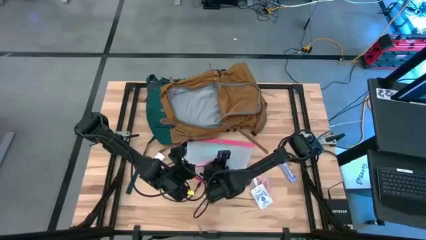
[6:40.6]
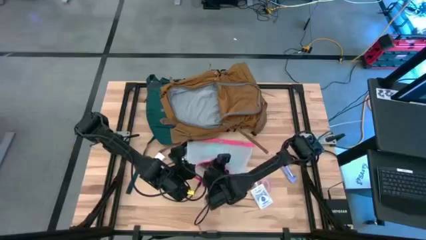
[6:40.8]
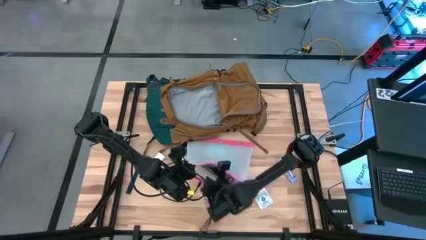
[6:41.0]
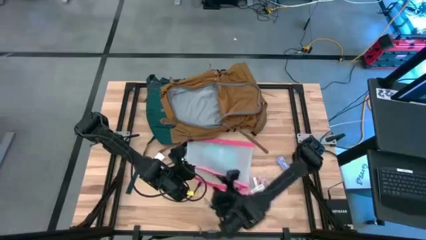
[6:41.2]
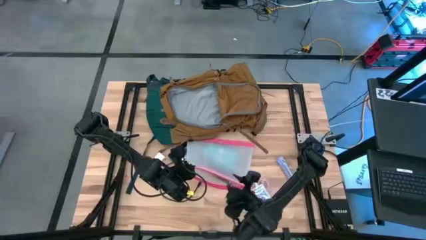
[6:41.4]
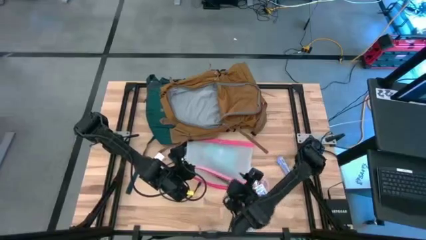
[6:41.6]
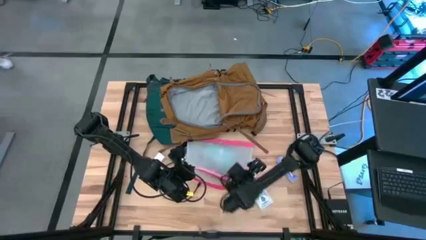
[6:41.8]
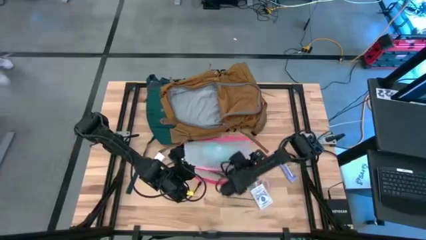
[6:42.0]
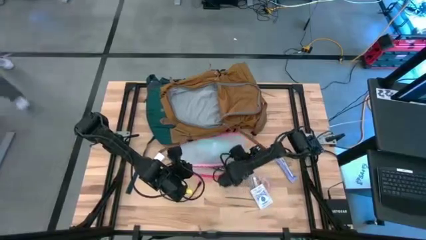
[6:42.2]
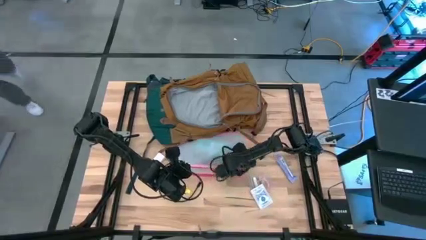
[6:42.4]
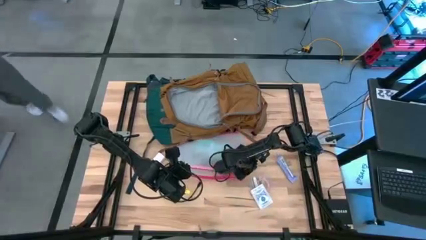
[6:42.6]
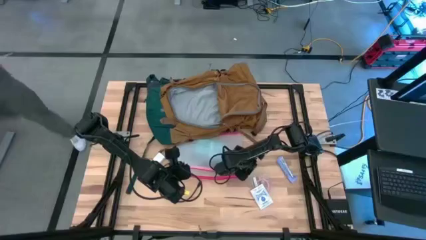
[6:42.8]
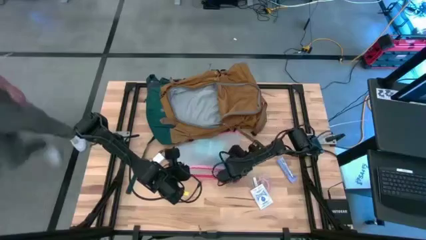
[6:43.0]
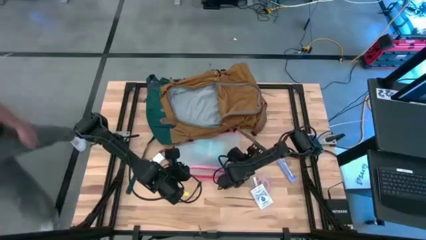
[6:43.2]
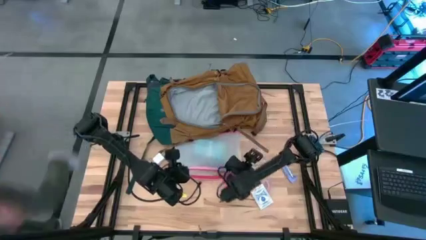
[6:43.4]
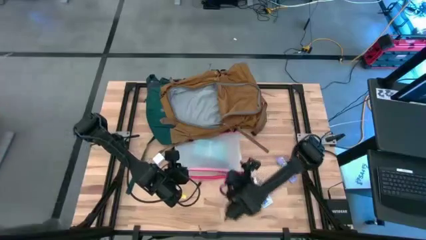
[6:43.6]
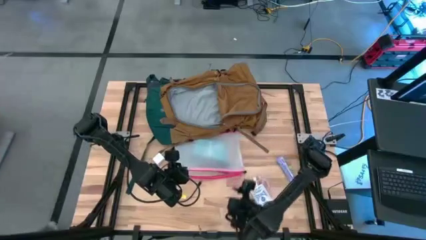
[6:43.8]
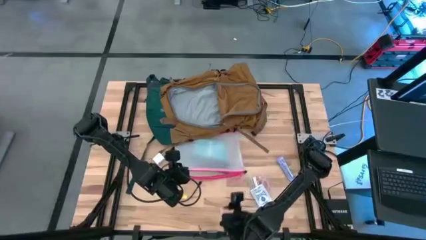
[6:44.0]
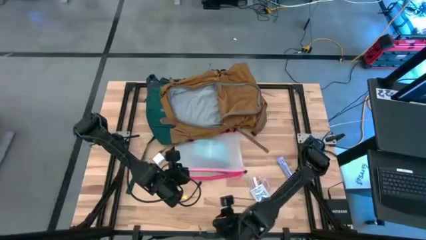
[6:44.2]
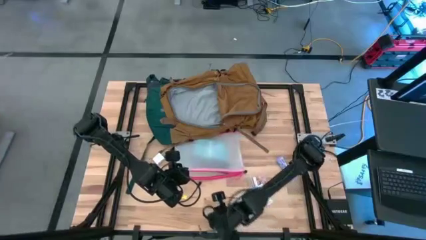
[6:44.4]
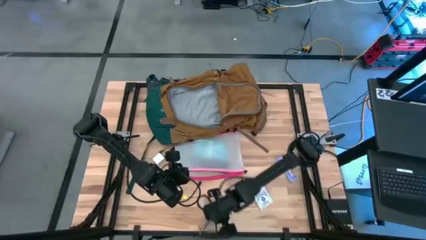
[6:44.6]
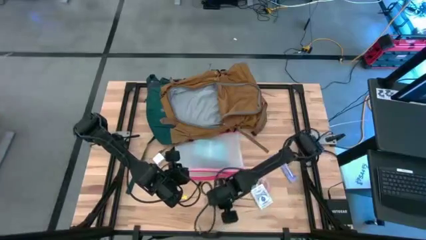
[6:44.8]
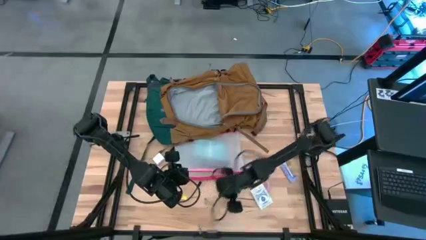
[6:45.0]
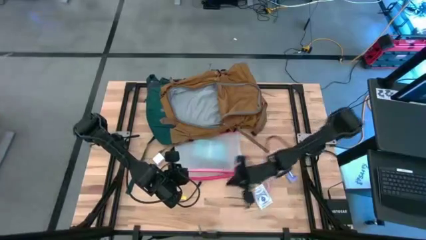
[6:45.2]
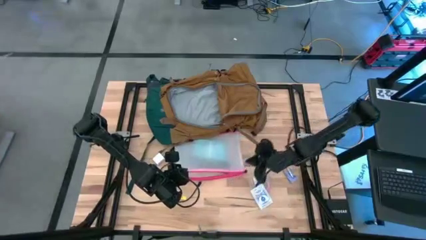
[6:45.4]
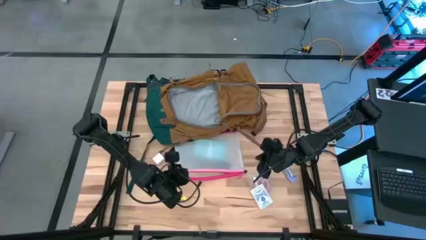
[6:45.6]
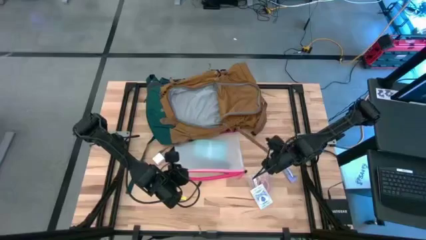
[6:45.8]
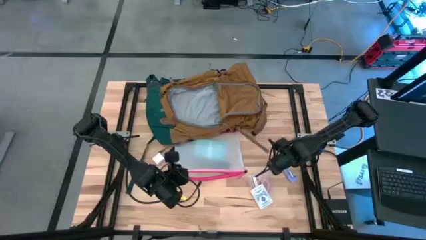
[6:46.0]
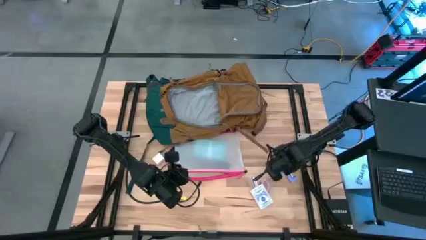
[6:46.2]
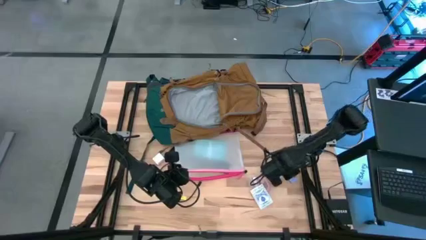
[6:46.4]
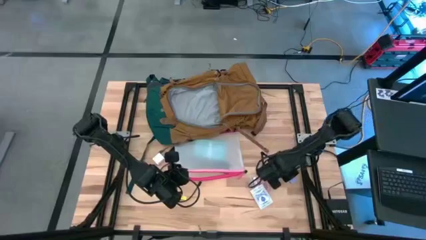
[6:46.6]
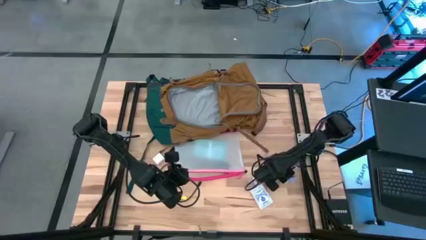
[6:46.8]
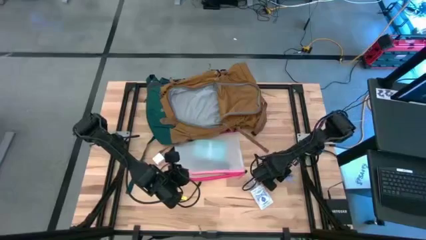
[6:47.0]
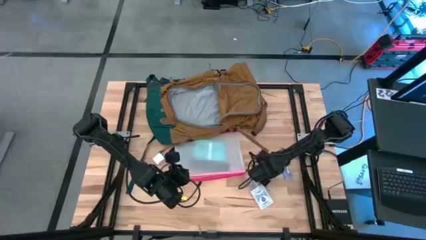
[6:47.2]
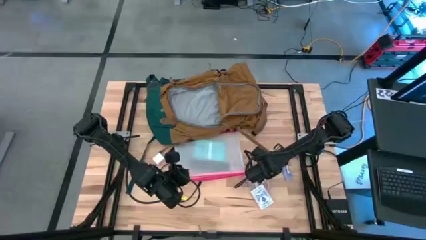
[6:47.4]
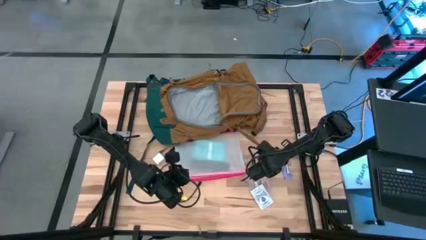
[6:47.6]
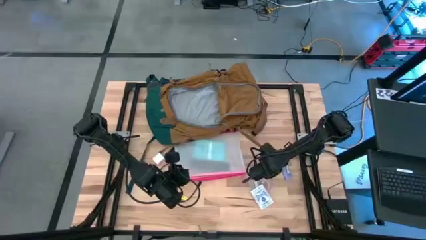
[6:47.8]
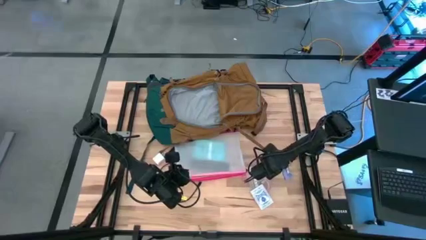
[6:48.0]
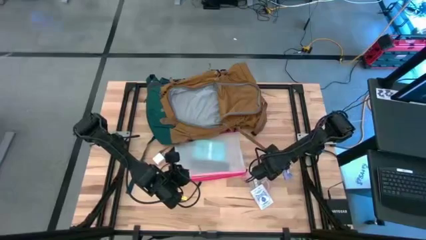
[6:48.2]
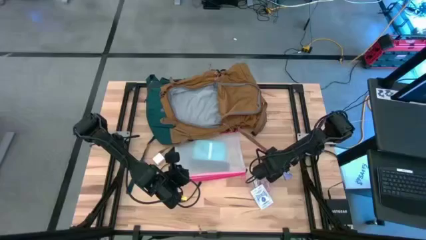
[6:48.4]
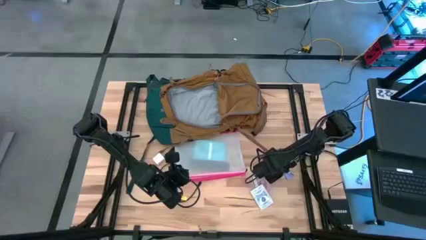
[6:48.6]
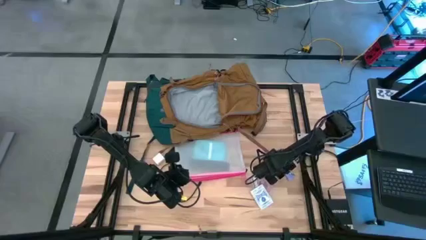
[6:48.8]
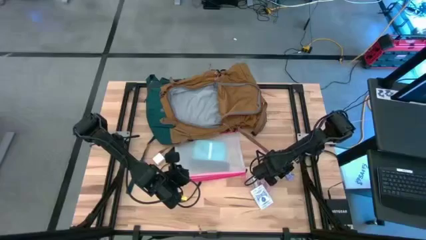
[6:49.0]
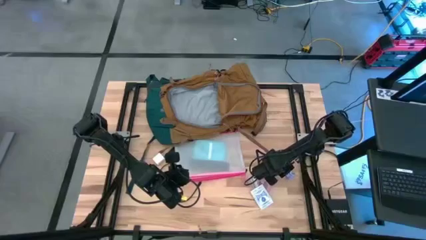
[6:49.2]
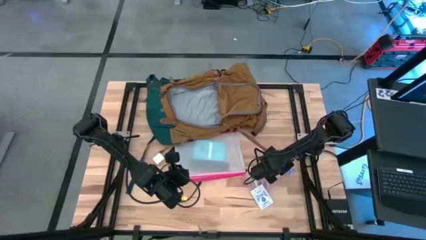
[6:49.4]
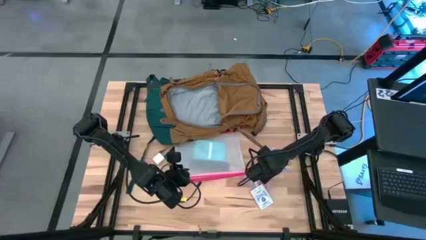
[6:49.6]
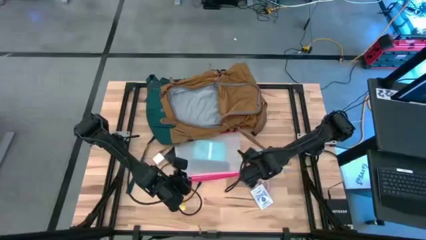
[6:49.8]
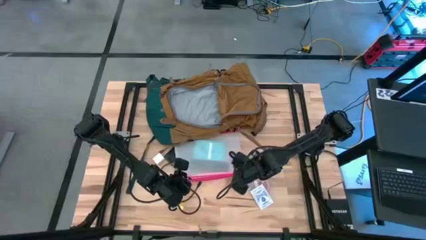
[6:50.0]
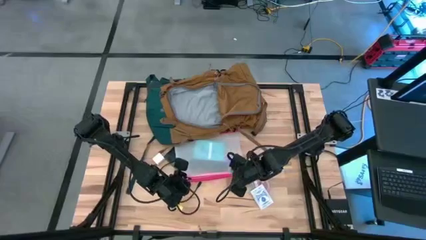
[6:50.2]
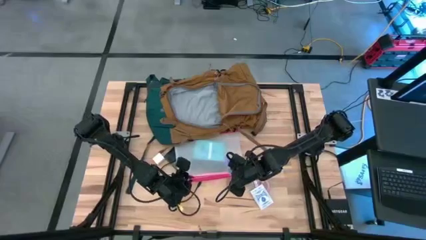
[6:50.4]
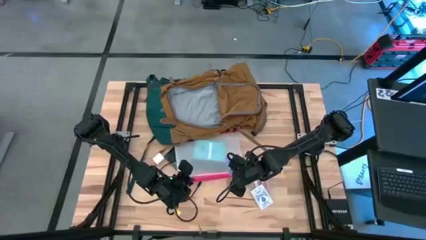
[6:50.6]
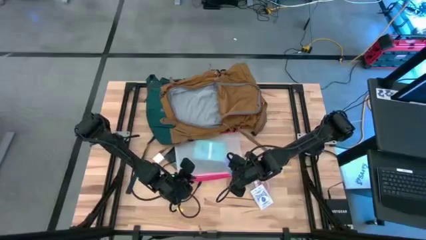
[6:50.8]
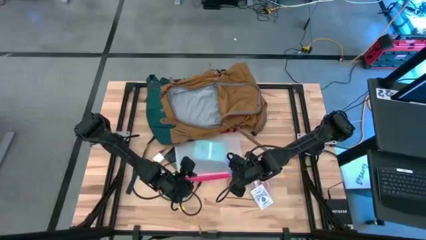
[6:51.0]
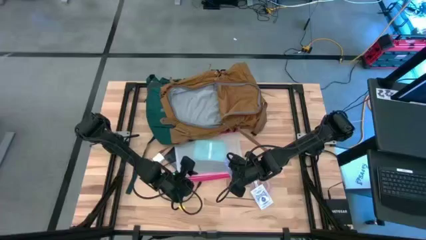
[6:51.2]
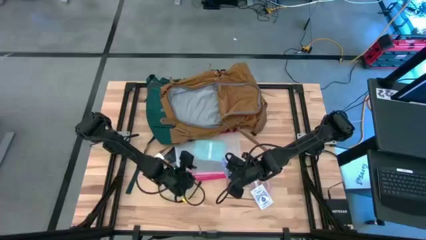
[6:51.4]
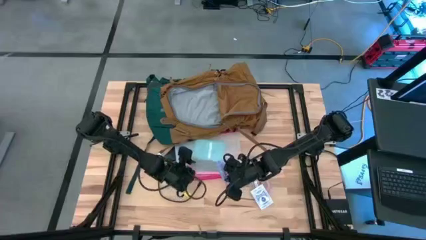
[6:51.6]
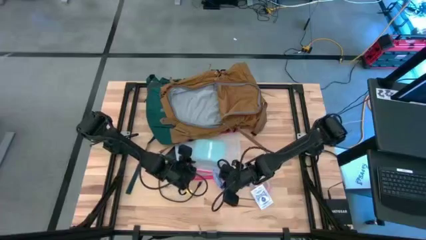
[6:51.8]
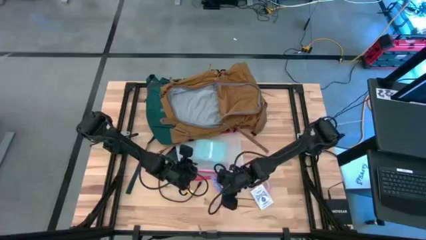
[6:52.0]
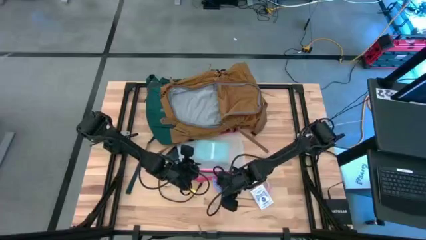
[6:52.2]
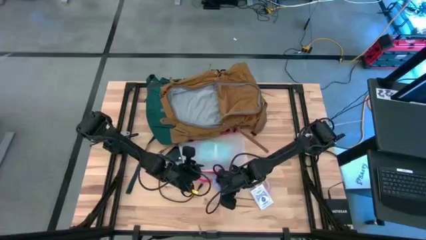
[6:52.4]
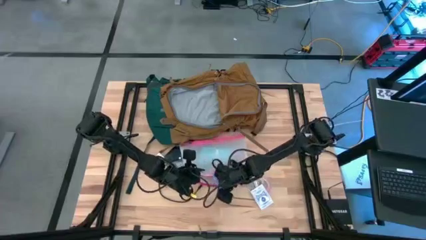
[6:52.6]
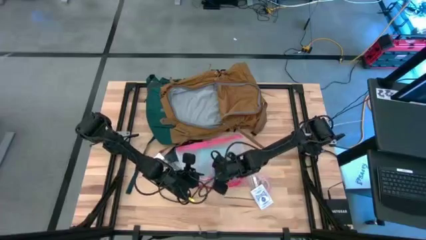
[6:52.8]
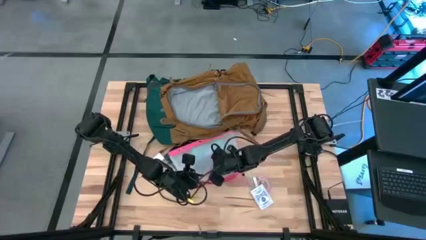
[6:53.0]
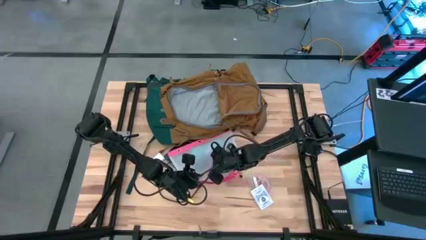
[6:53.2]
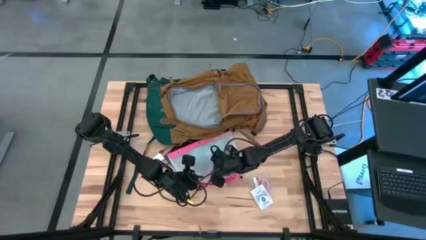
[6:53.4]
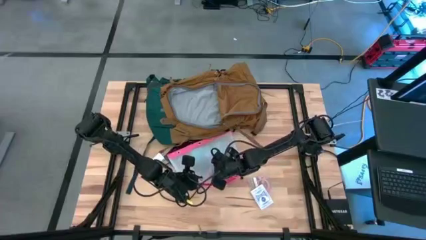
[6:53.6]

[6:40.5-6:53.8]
Task: Unpack backpack
Put the blue chocolate bar into the pink zipper pouch

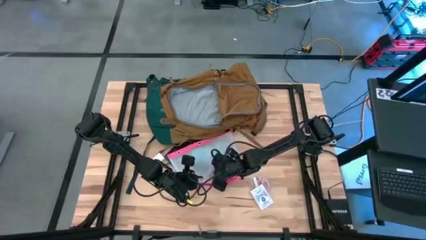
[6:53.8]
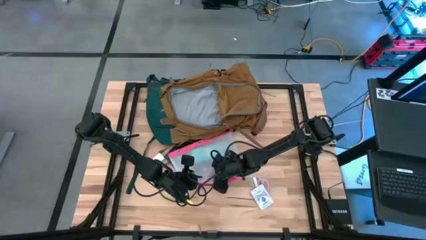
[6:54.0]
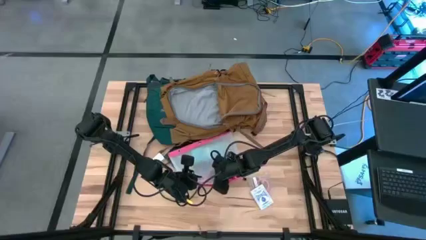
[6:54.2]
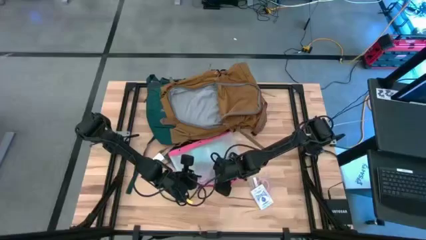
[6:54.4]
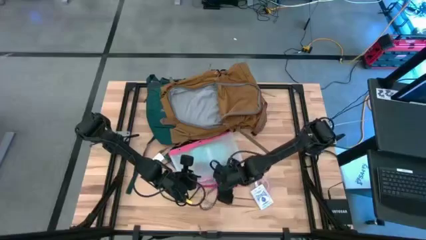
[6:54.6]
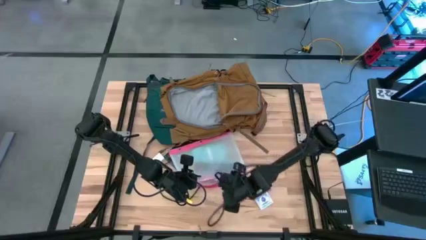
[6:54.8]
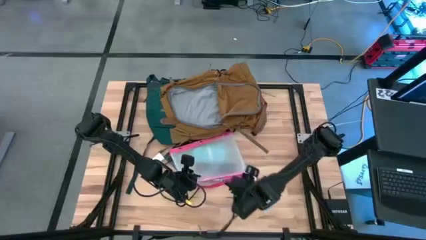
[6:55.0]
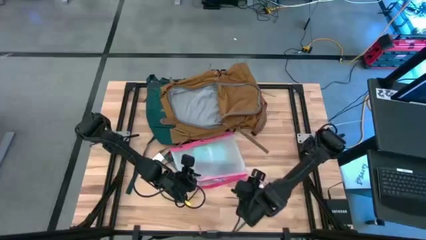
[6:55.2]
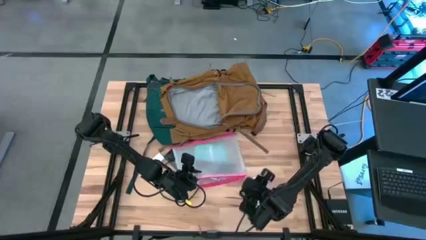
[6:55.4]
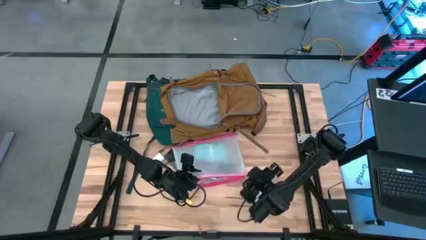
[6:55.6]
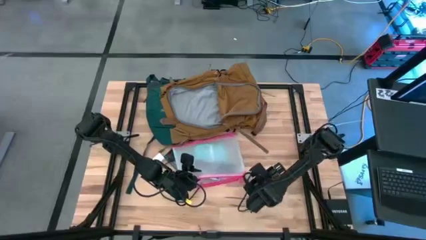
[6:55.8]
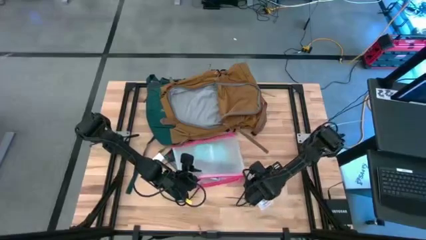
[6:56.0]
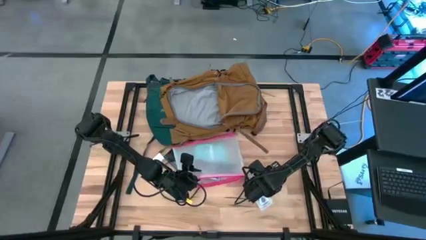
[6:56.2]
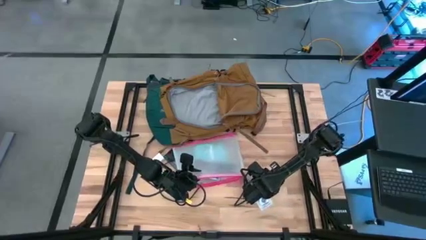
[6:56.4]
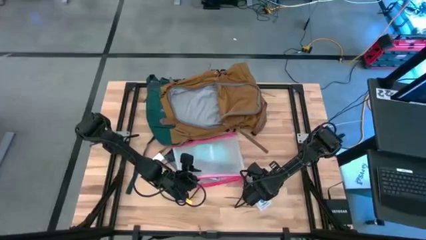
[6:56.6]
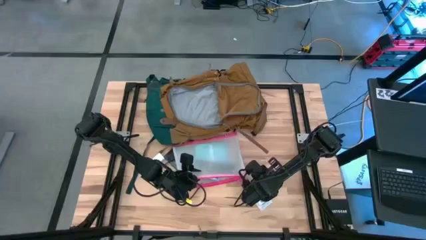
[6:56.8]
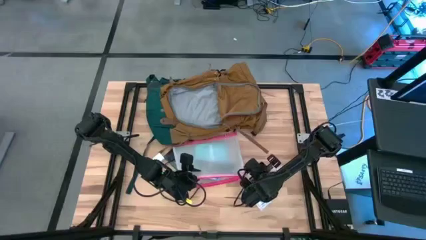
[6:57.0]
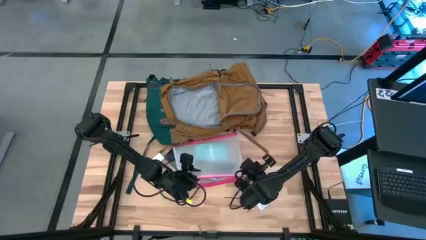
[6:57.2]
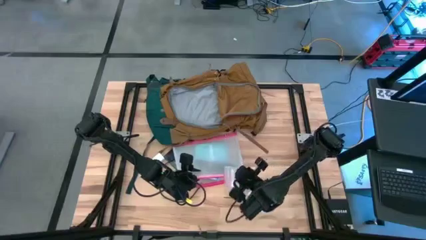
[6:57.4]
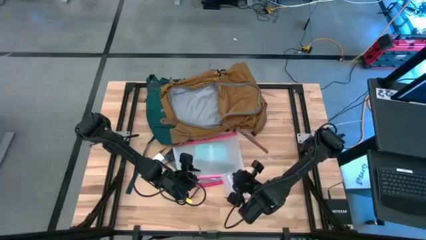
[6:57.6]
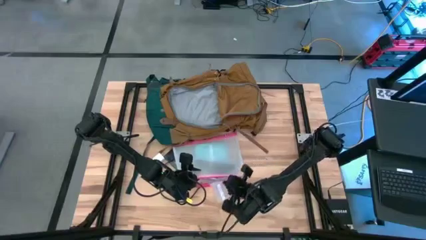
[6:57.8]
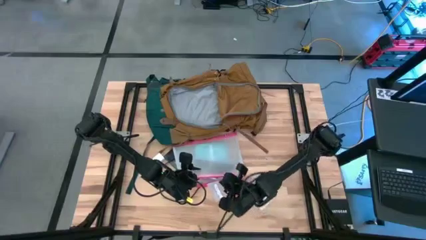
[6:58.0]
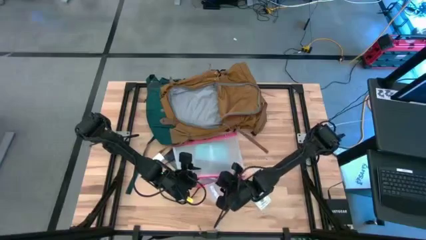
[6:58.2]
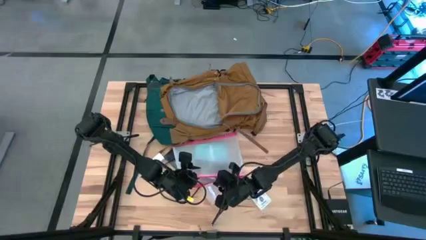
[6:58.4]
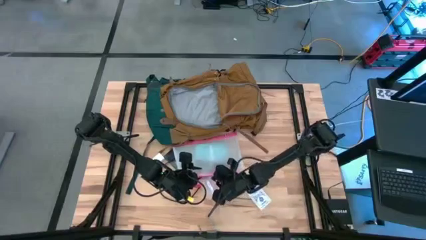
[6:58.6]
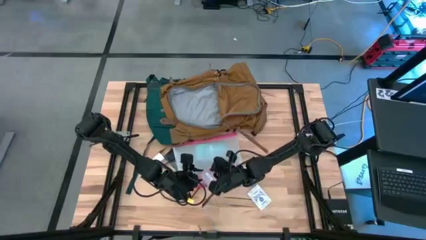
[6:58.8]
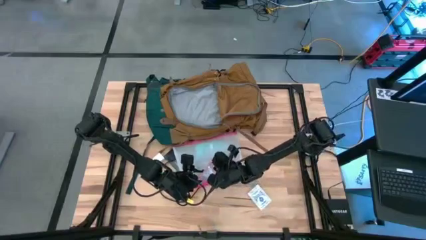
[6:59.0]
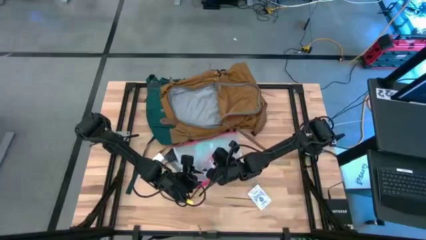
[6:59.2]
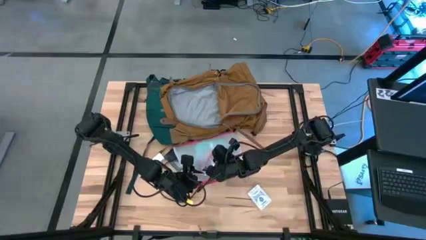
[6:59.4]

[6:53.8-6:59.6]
Put the pink earphones into the pink zipper pouch
